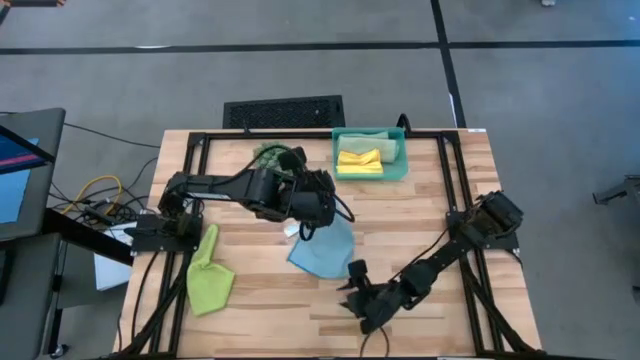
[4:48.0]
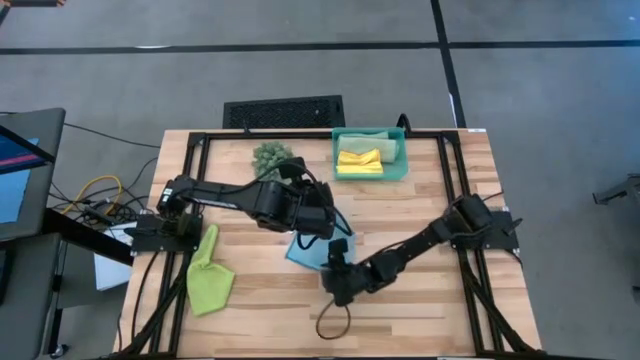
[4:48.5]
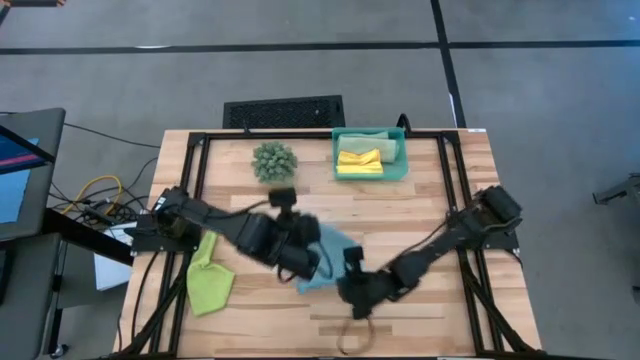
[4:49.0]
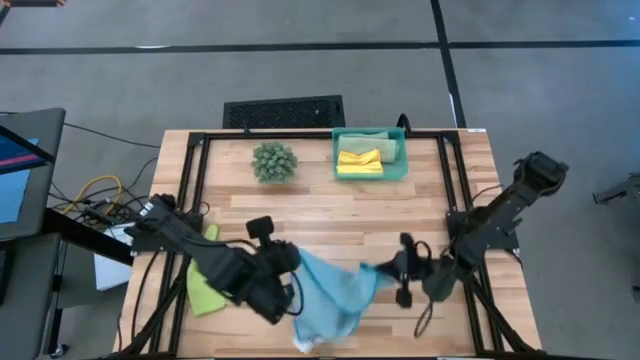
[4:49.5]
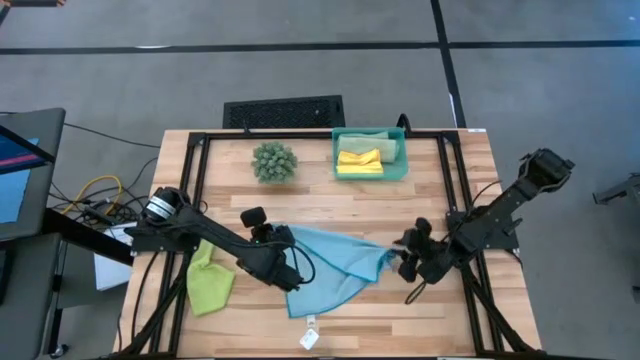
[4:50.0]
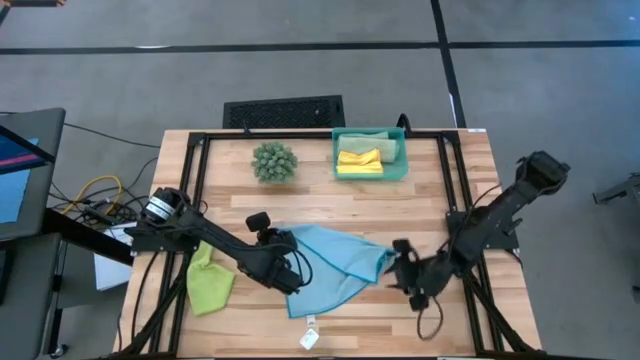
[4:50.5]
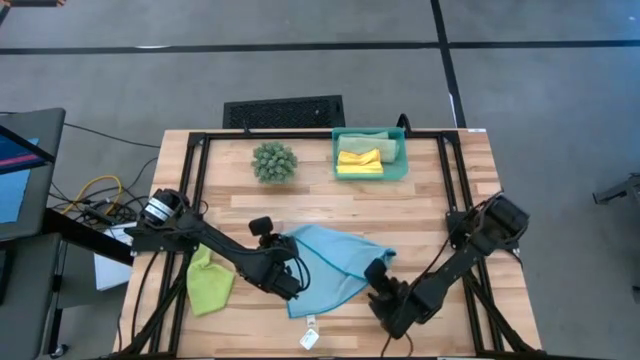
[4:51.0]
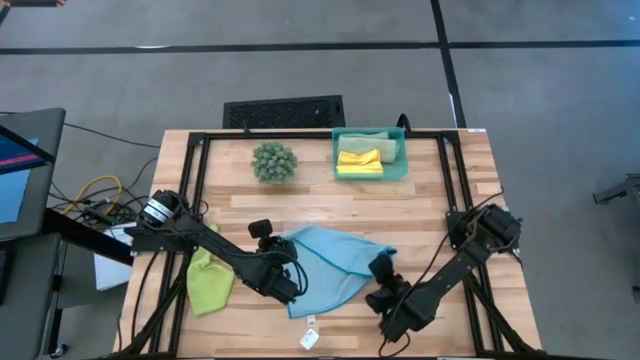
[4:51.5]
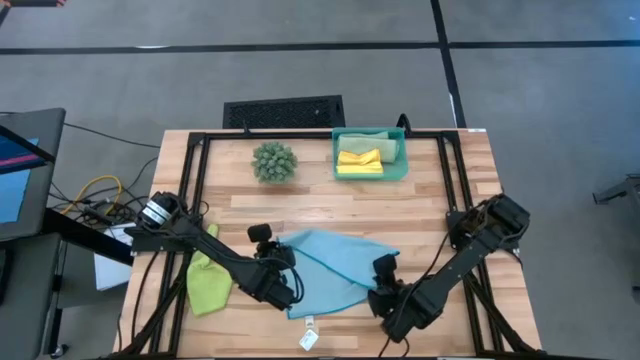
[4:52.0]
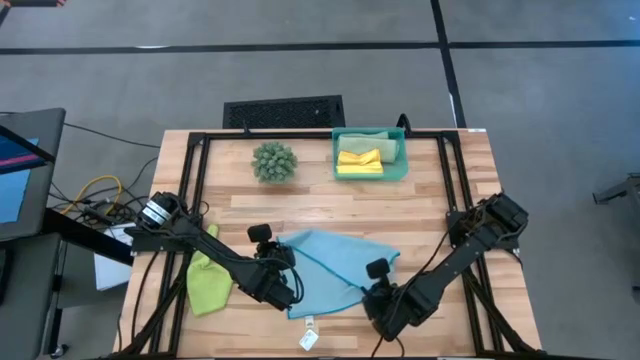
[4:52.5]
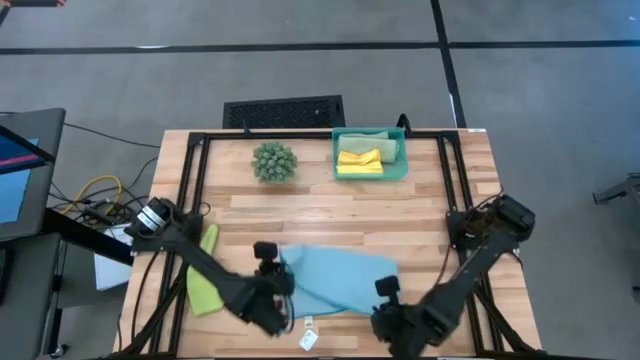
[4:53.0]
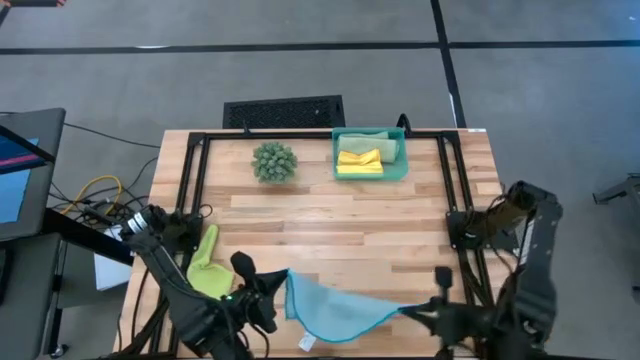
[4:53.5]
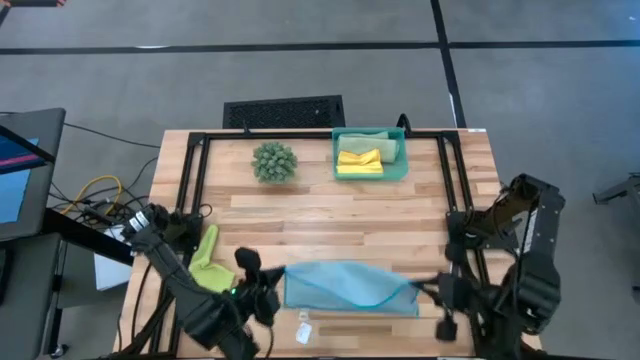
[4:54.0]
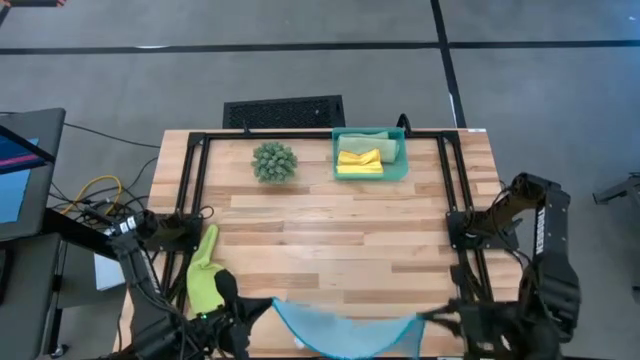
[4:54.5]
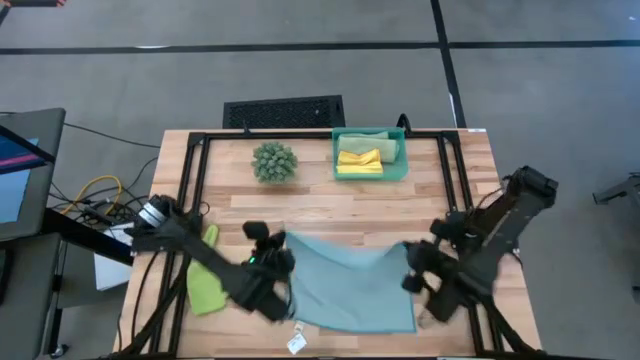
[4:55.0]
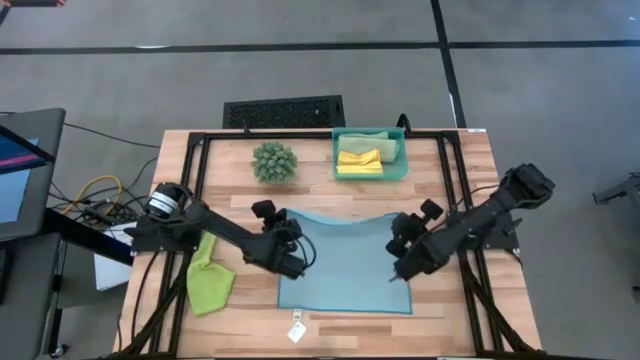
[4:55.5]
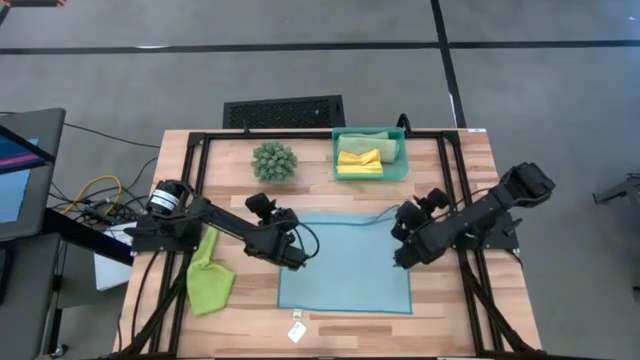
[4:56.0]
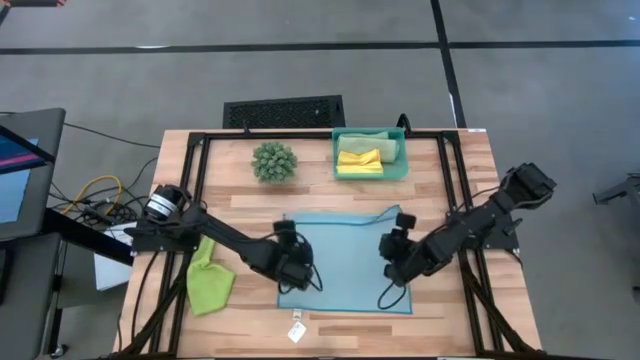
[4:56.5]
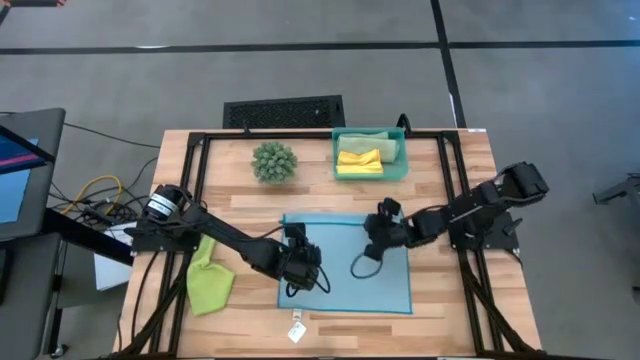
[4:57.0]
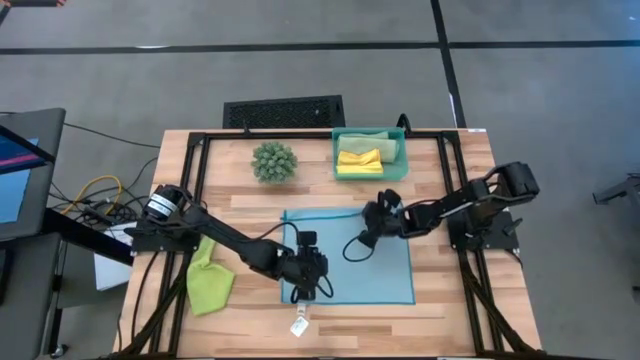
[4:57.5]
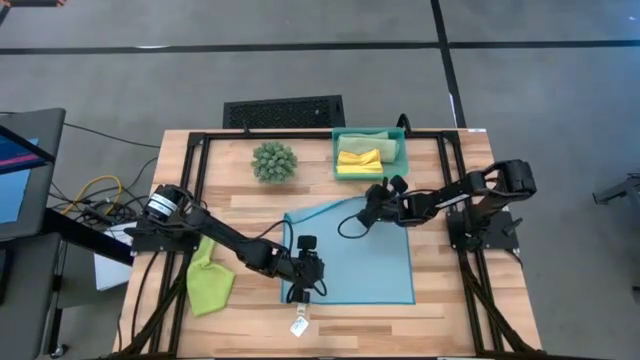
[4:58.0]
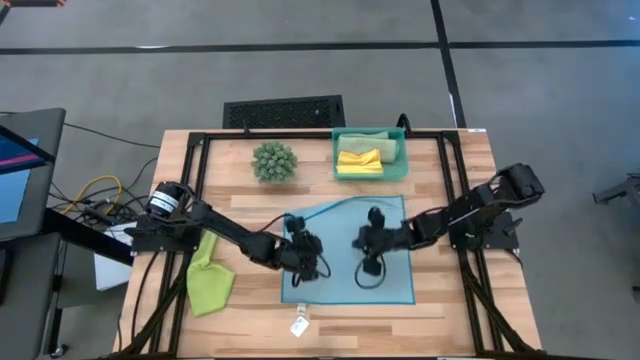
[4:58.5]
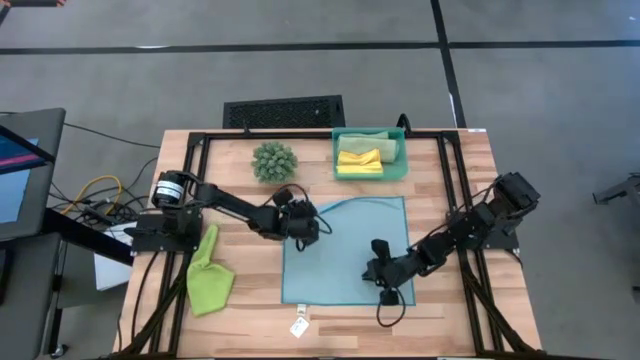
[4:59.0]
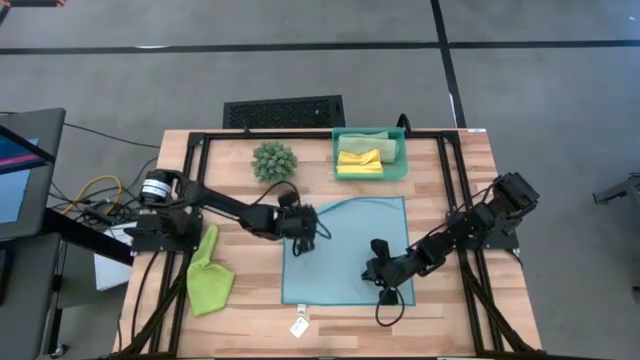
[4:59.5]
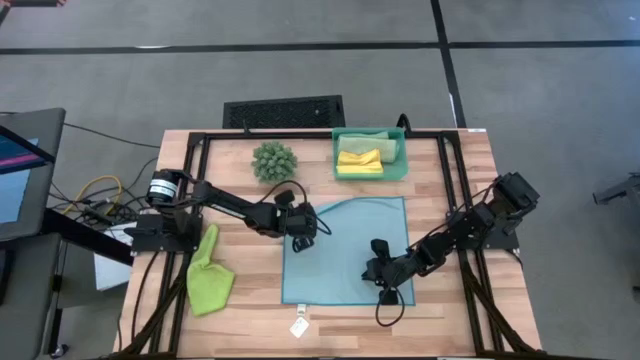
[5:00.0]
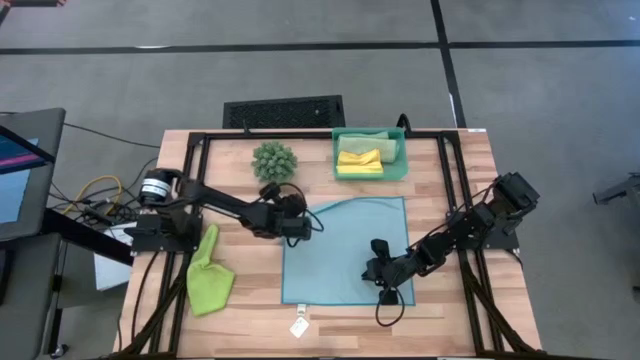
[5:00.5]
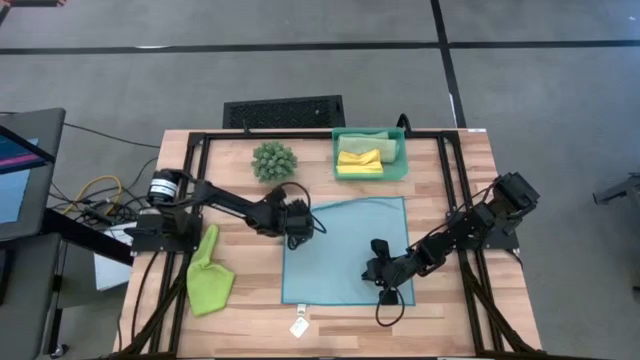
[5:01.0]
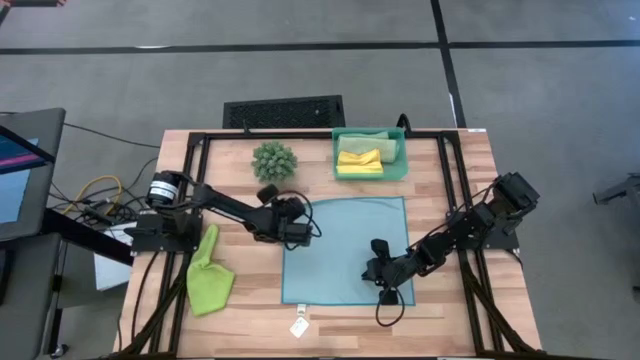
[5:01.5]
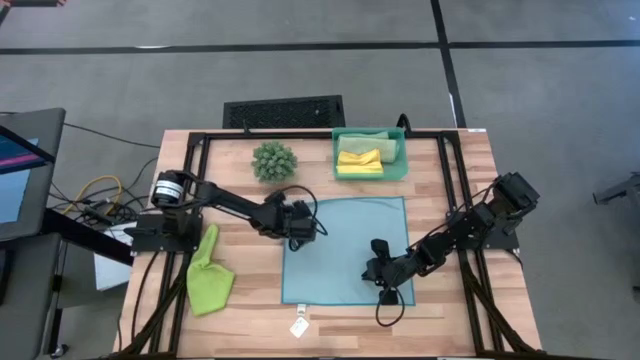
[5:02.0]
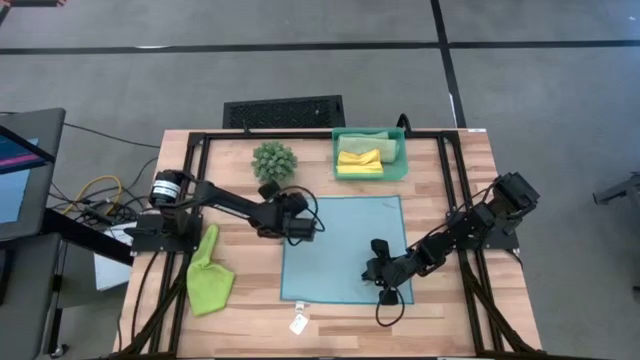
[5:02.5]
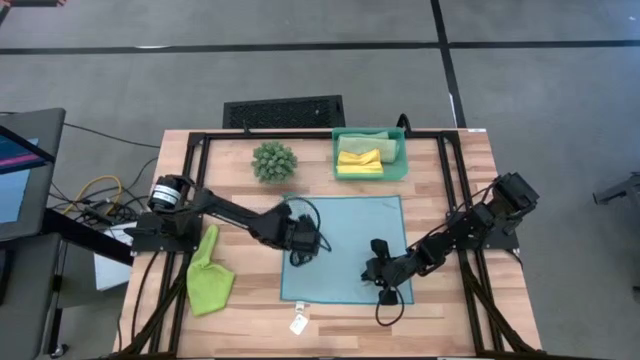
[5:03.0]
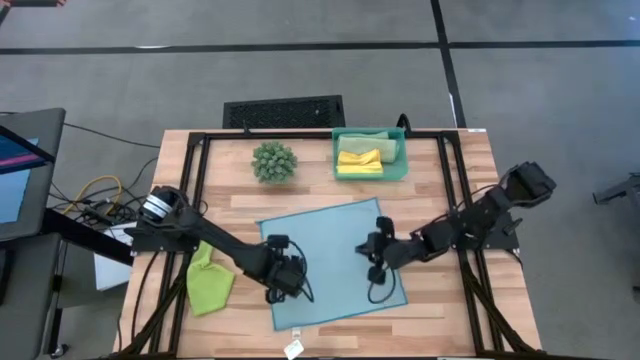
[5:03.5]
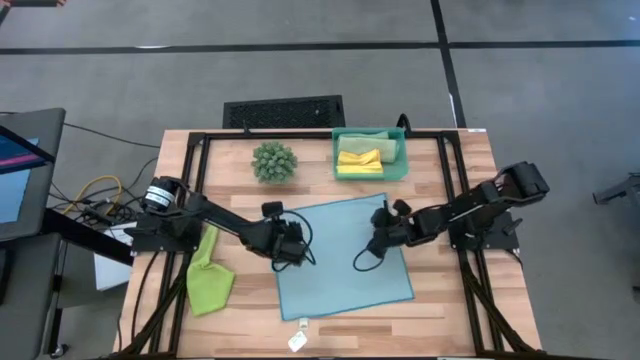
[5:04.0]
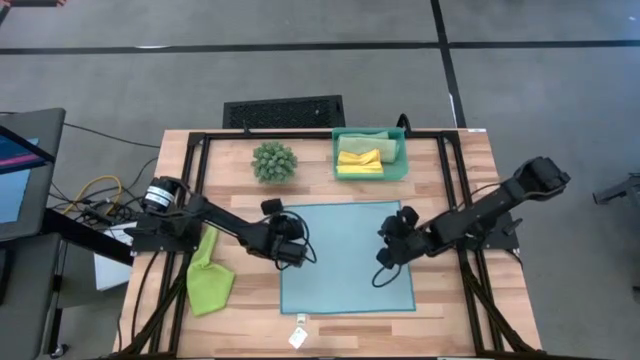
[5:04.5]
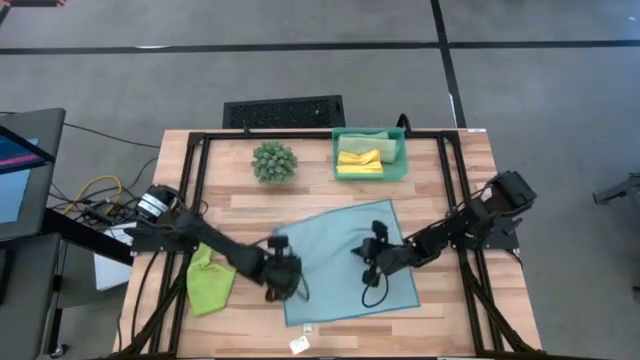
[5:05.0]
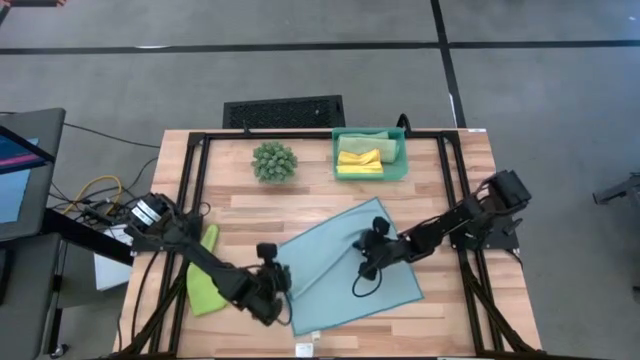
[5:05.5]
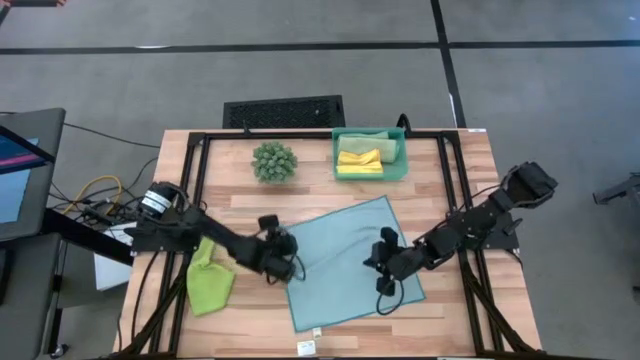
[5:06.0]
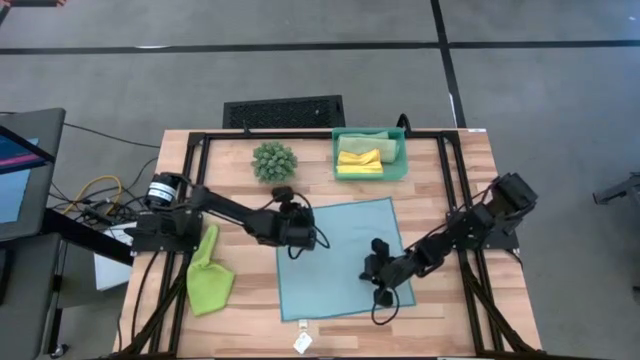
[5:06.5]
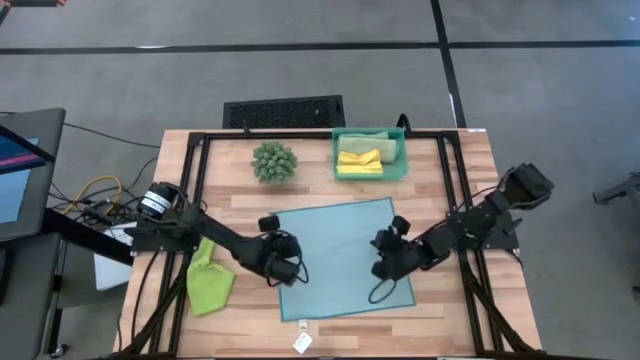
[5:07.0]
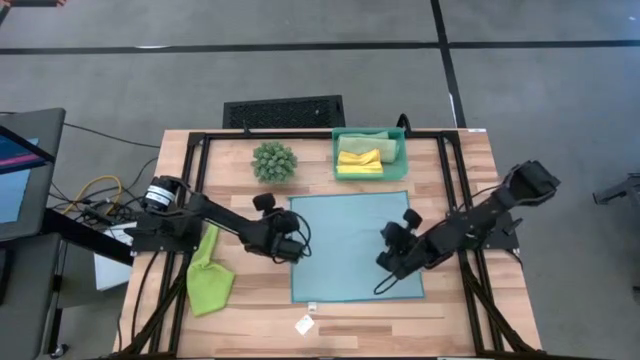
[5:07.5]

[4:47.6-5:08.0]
Task: Roll microfiber towels into tight, uniform cylinder then place into a basket
Roll the blue microfiber cloth

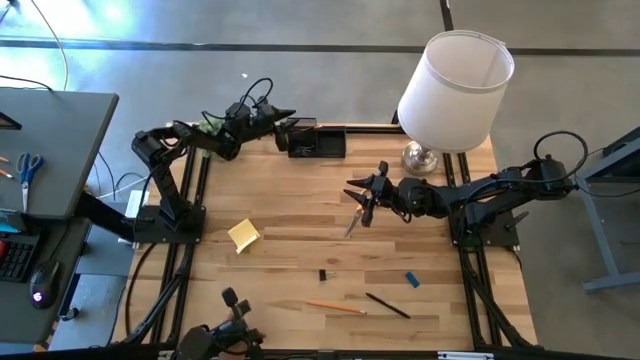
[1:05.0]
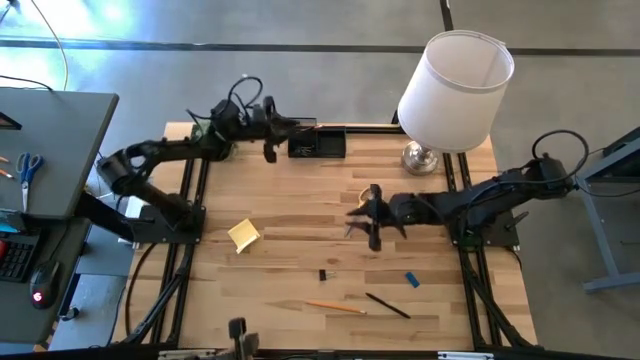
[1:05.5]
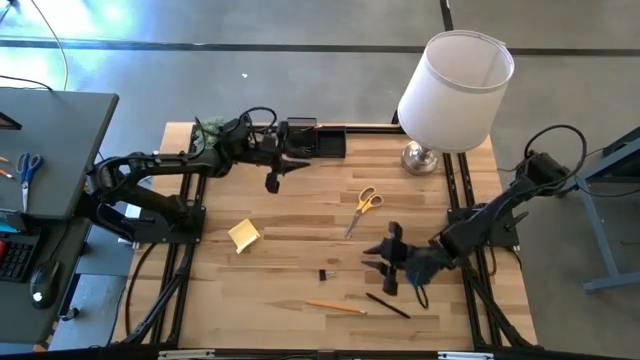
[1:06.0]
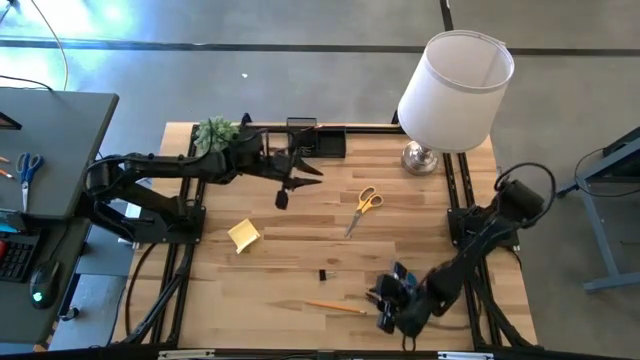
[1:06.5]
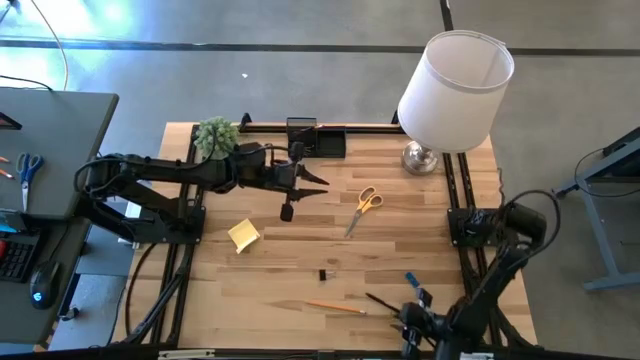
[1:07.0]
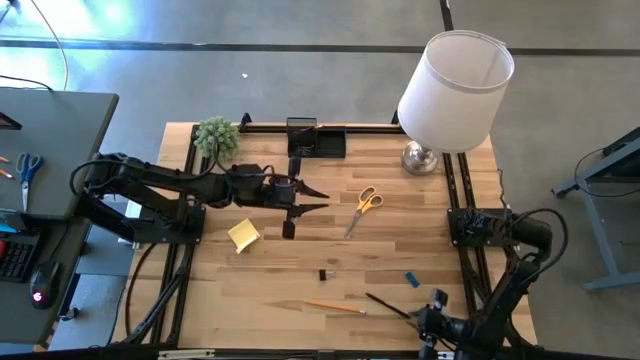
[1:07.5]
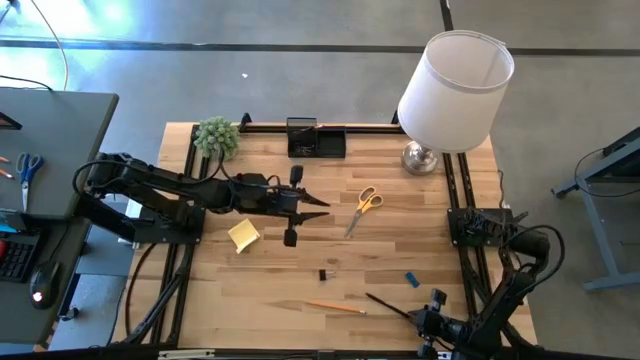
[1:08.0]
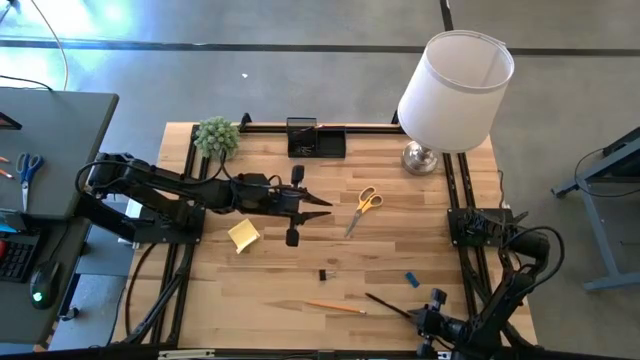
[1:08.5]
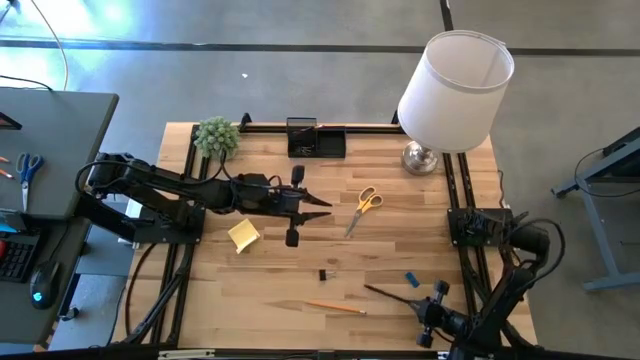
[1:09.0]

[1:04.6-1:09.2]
Task: Pick and place office supplies into organizer
Put the black pen into the top left slot of the desk organizer
